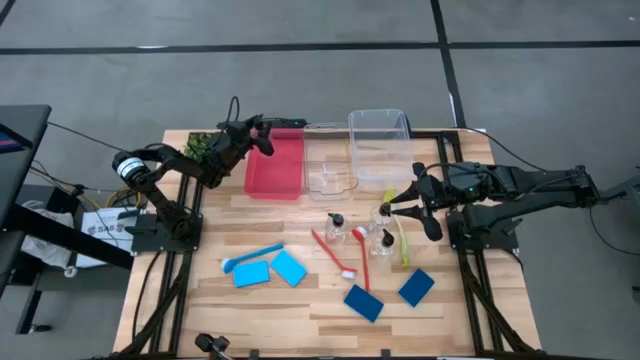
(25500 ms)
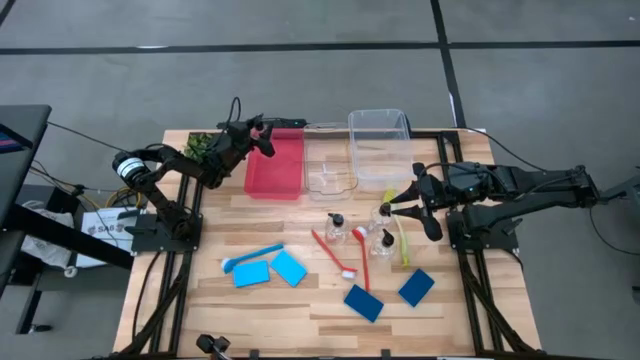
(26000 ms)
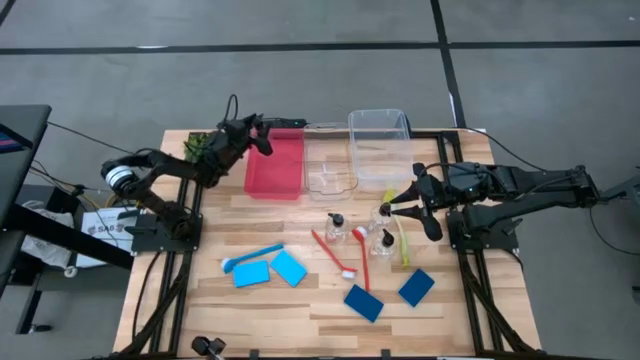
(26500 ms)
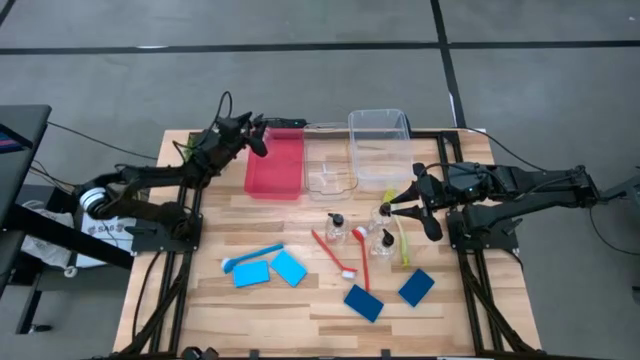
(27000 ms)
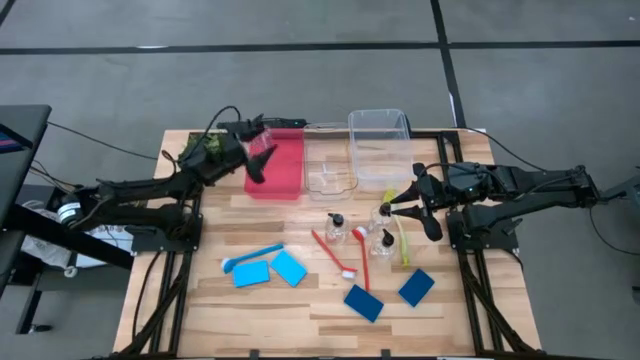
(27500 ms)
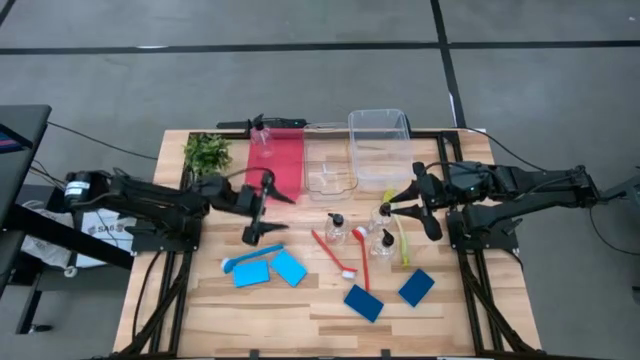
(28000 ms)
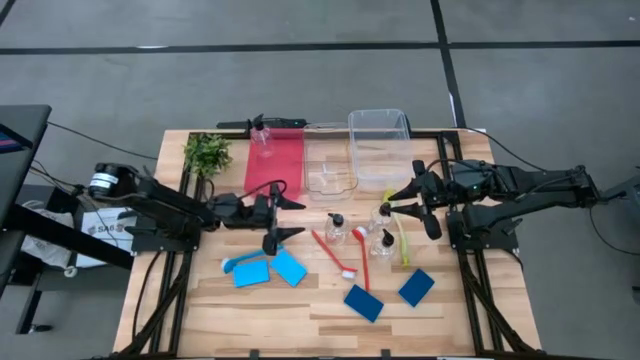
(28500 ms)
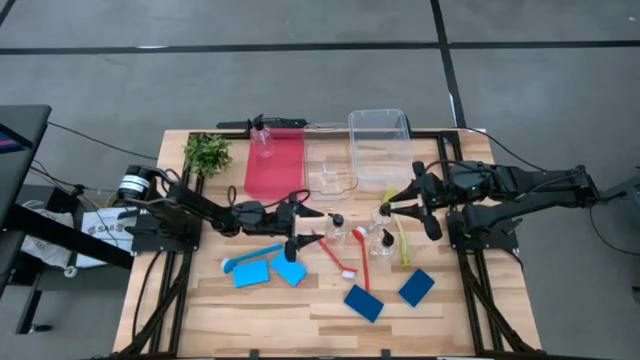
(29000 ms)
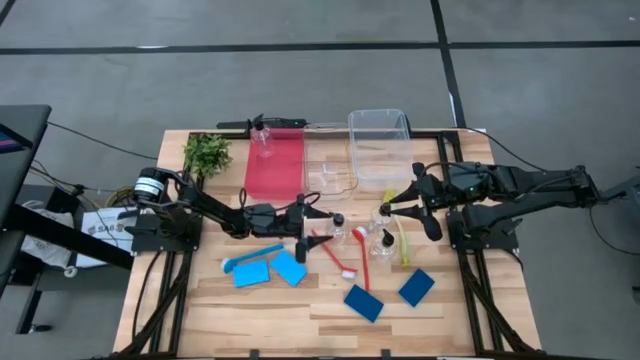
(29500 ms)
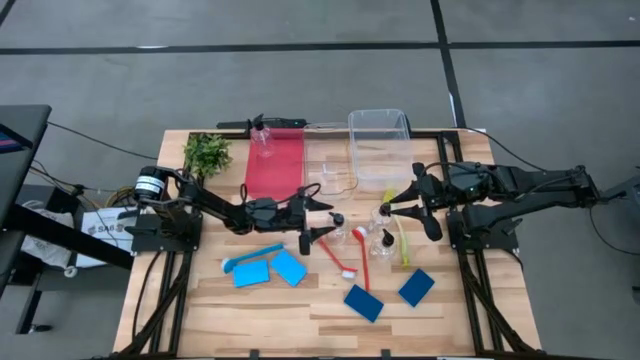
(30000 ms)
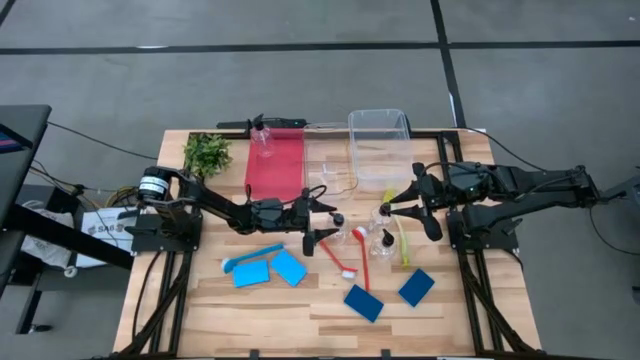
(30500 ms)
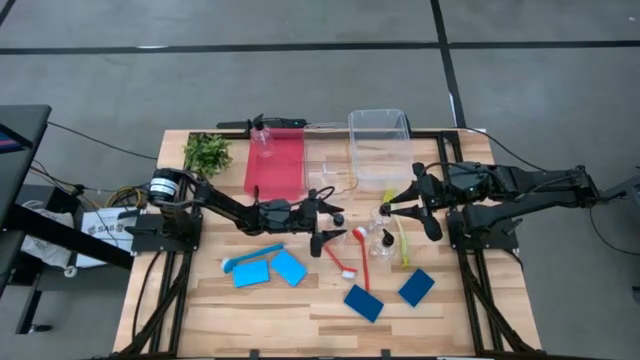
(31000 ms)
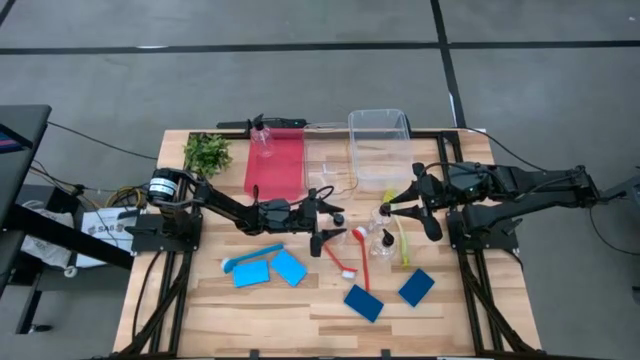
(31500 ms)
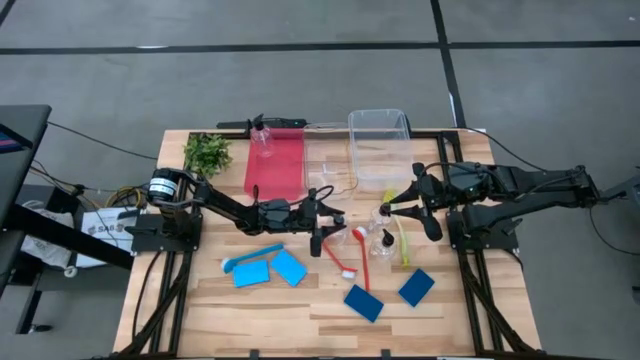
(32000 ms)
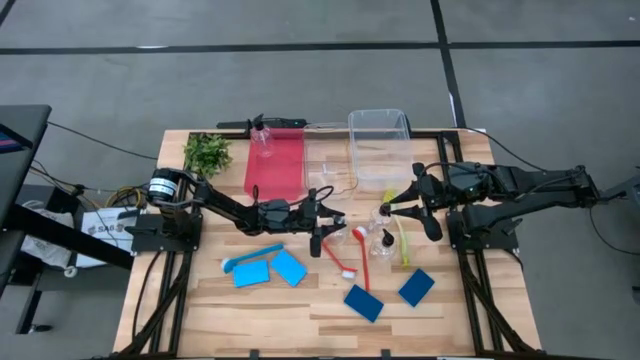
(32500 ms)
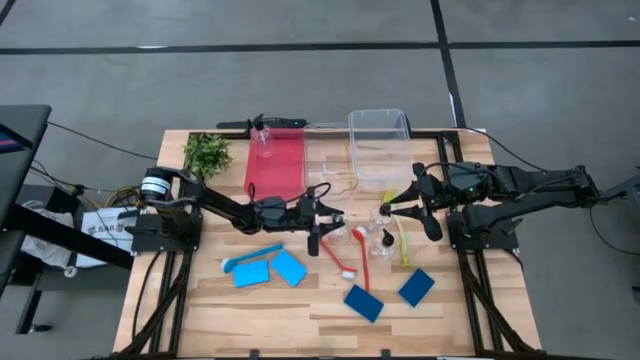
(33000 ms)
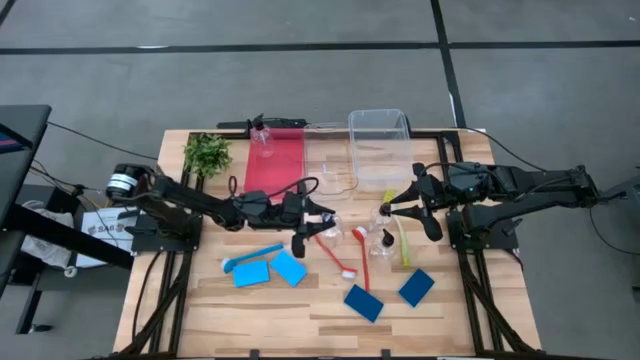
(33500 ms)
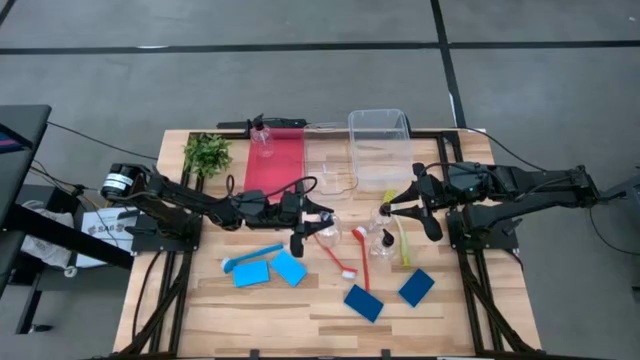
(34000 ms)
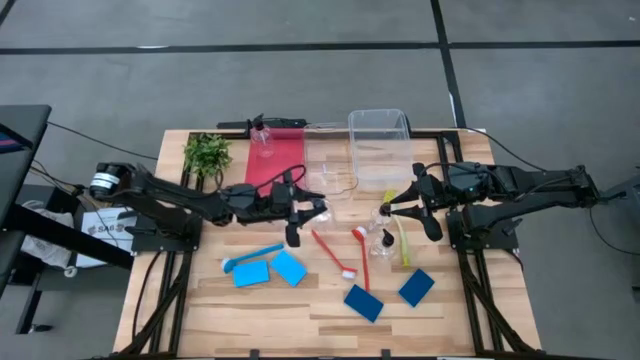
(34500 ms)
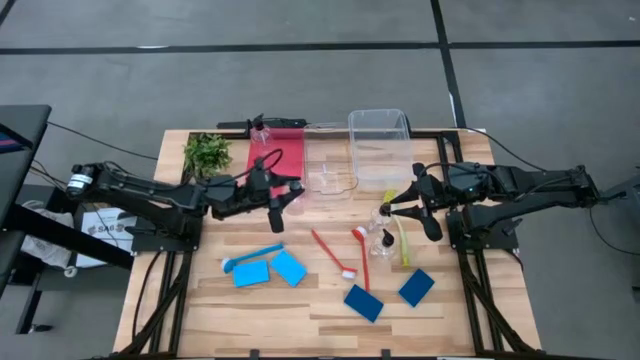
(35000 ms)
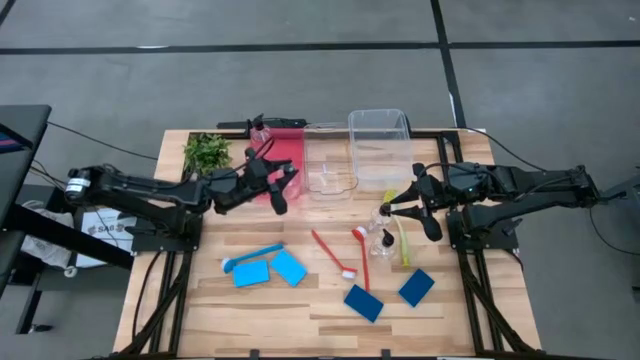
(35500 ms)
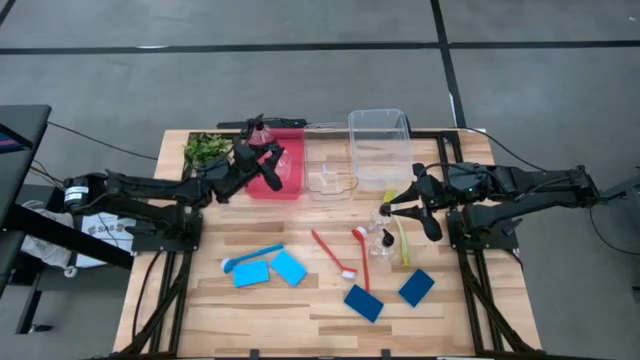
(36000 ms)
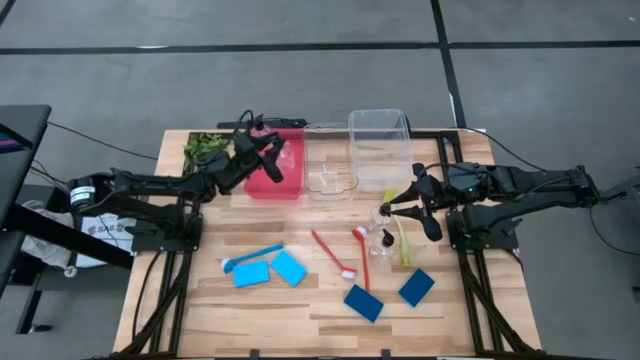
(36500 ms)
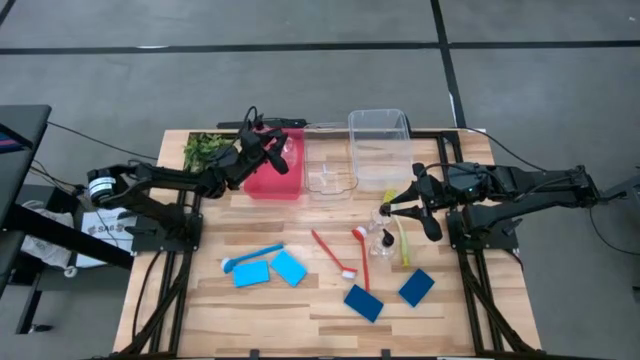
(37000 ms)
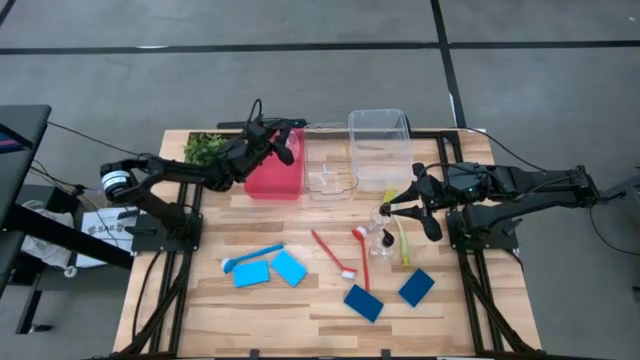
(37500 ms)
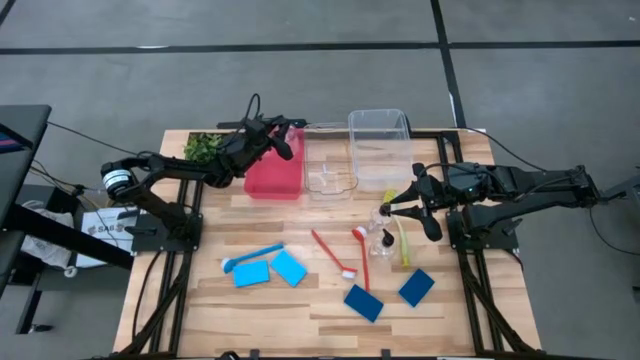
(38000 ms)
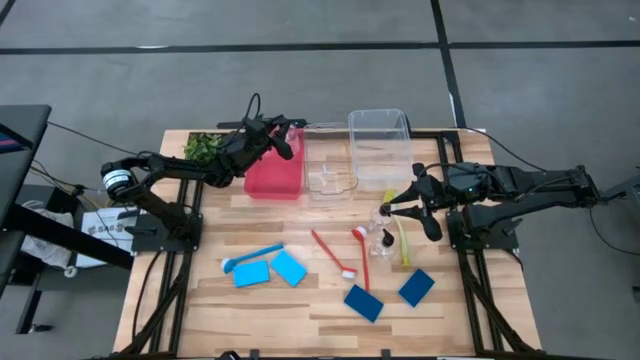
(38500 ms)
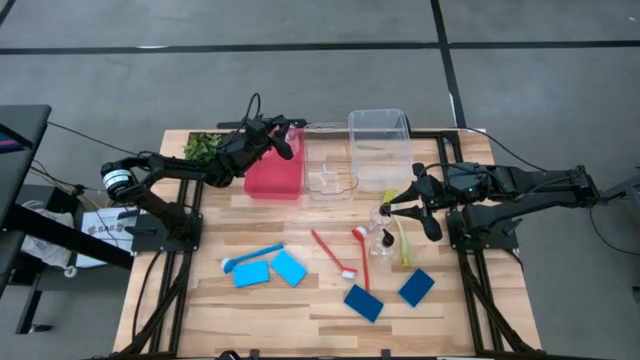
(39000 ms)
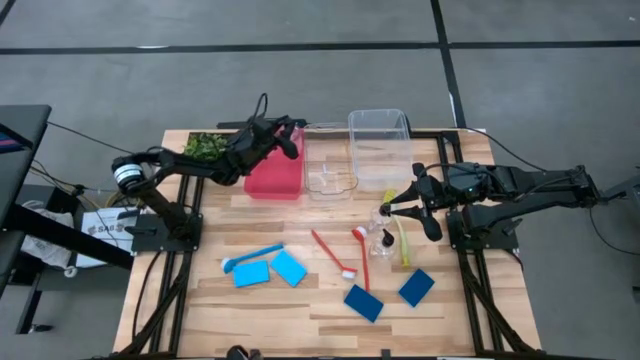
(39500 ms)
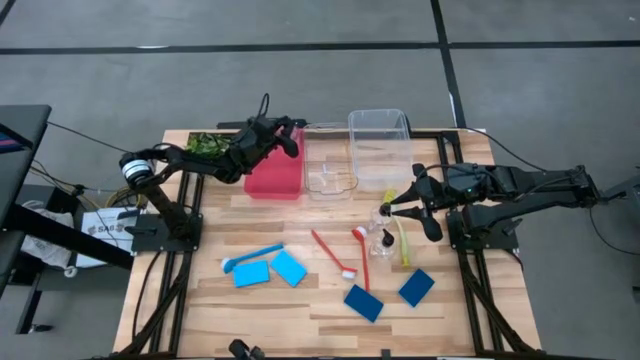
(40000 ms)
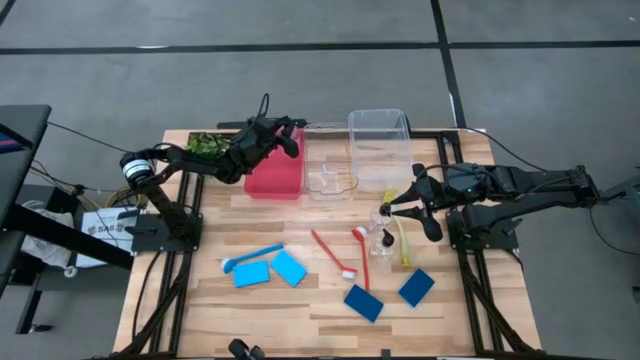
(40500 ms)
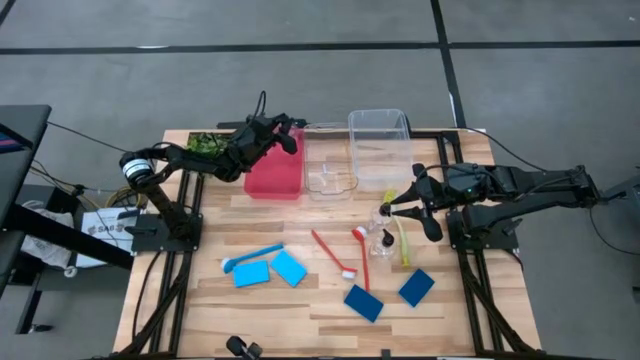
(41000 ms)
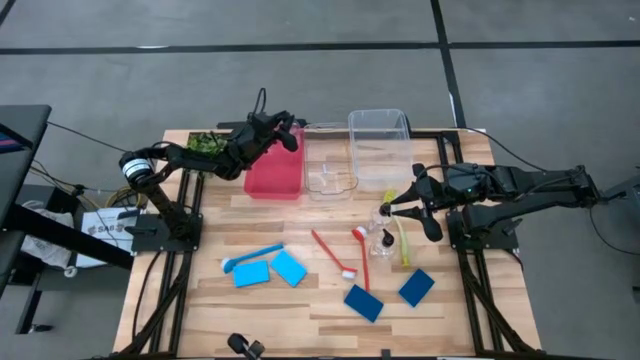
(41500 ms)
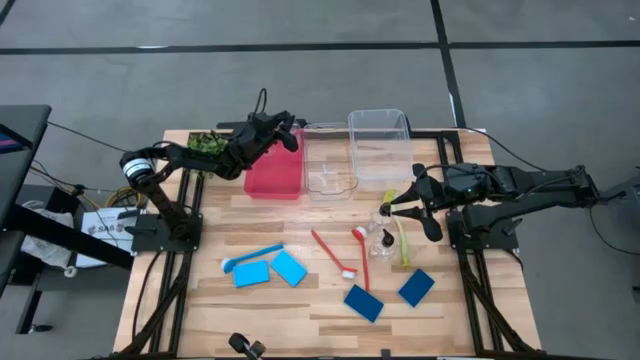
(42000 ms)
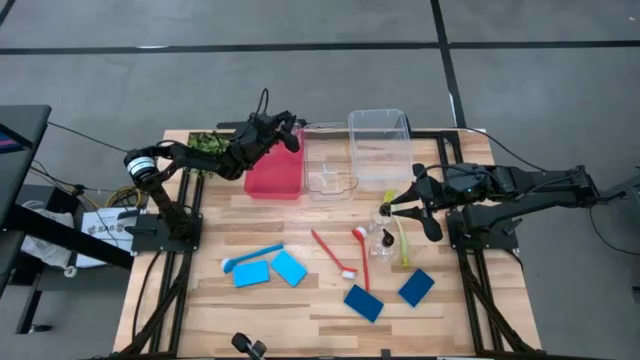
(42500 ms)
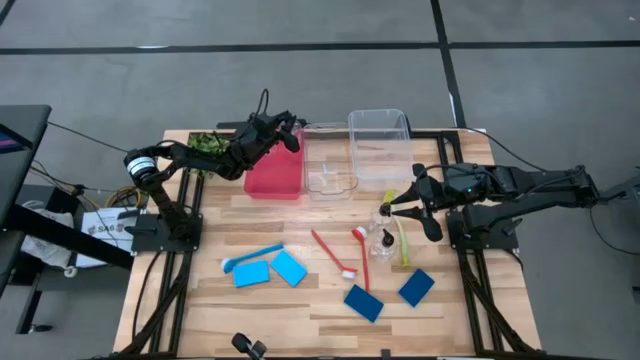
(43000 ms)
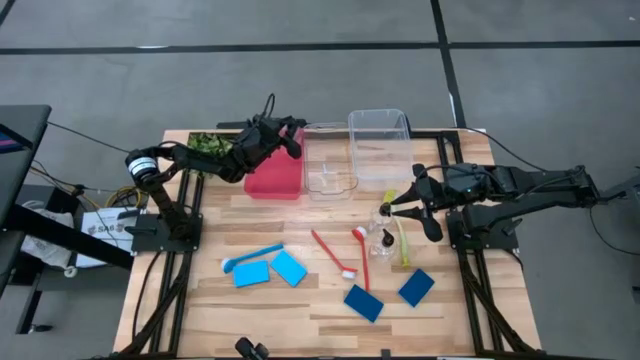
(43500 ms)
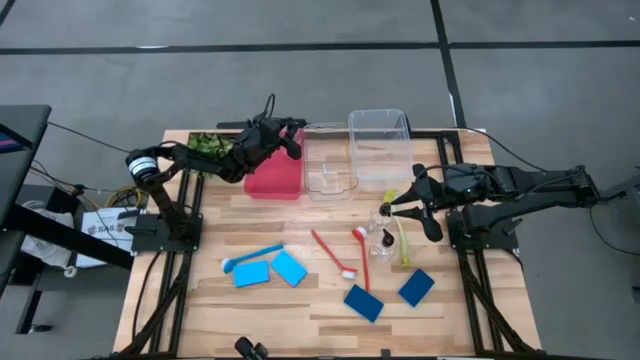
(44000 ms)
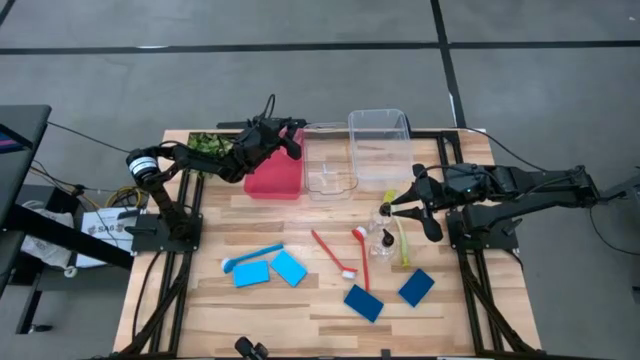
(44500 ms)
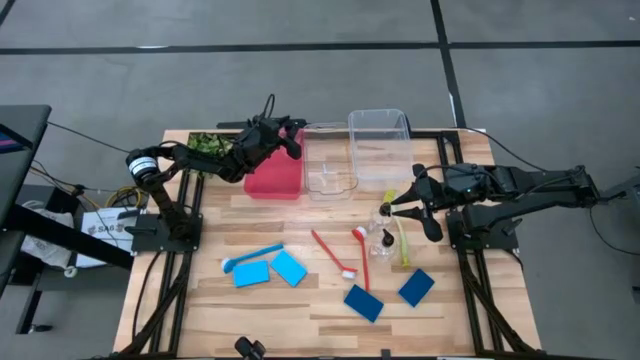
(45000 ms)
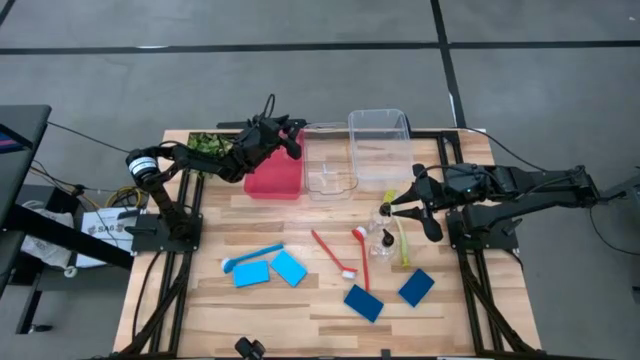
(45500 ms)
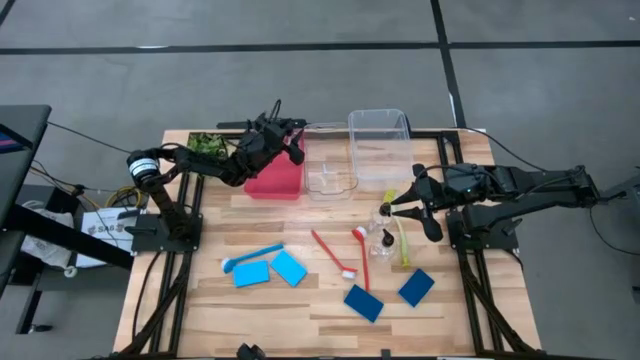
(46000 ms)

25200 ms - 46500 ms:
Task: Pick & Place Kitchen Sink Supplies
Put the middle left transparent soap dispenser into the red bin
